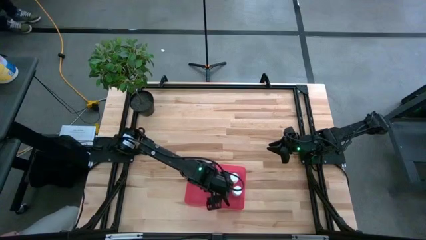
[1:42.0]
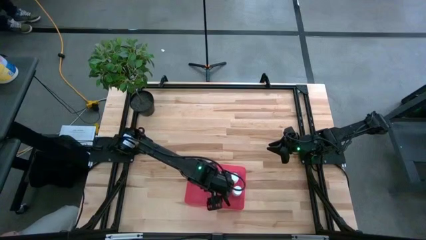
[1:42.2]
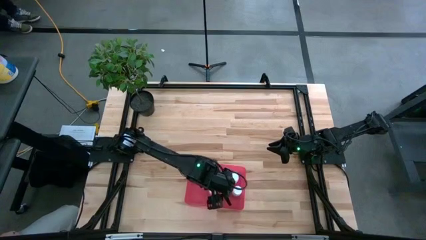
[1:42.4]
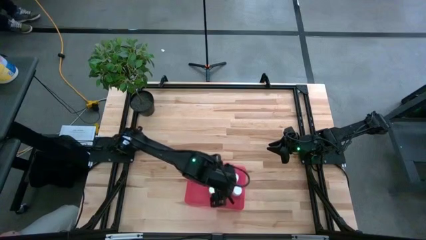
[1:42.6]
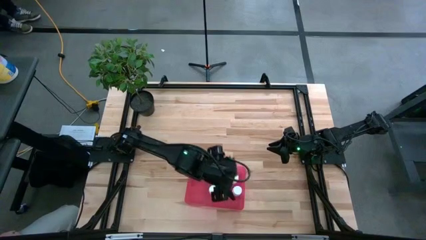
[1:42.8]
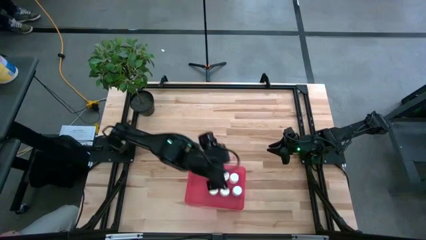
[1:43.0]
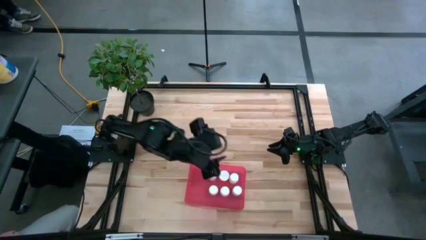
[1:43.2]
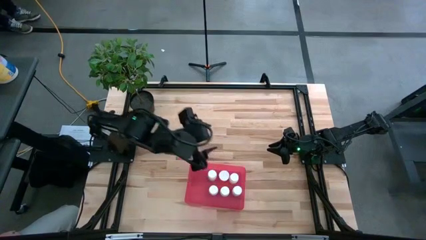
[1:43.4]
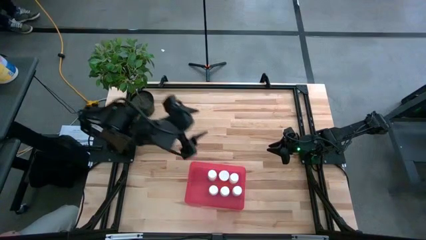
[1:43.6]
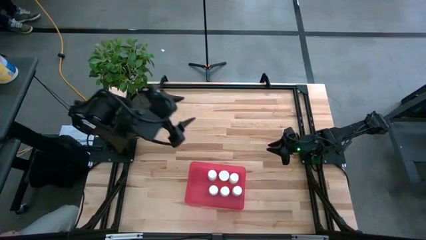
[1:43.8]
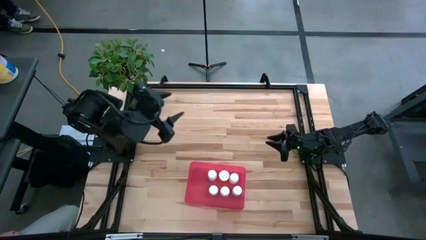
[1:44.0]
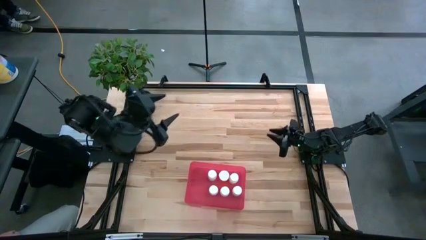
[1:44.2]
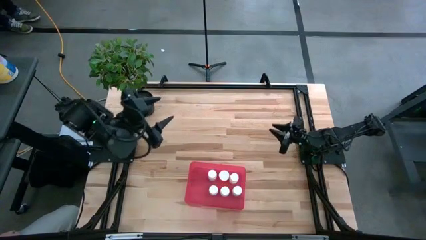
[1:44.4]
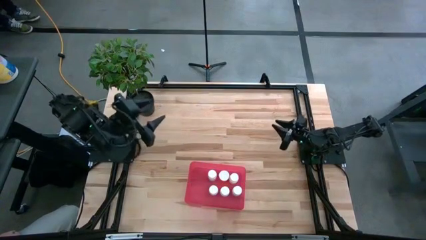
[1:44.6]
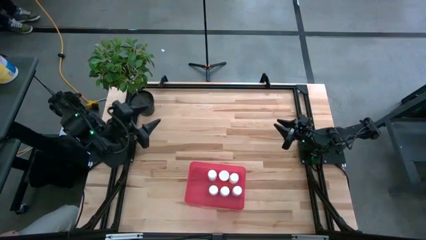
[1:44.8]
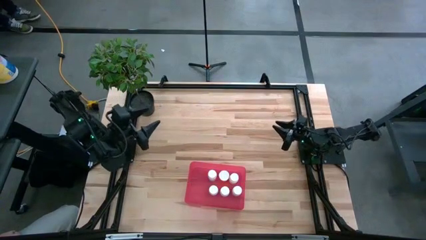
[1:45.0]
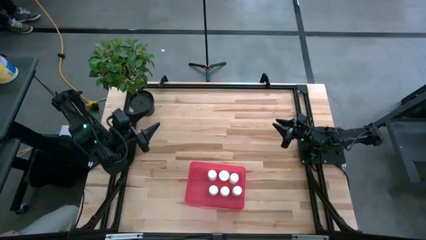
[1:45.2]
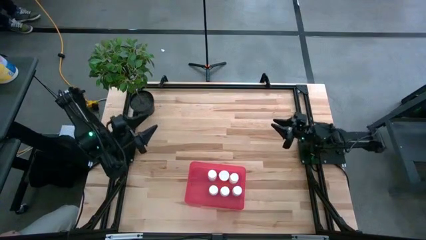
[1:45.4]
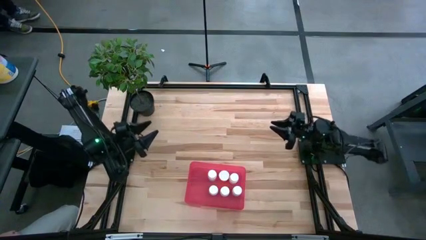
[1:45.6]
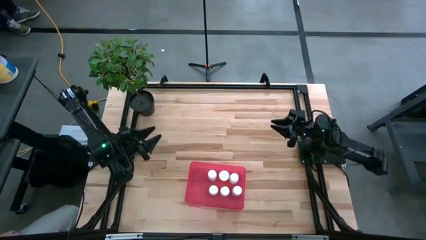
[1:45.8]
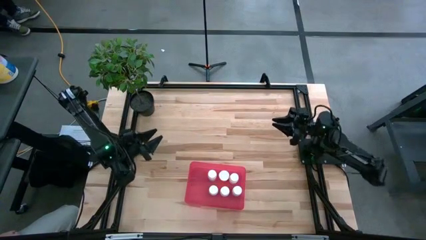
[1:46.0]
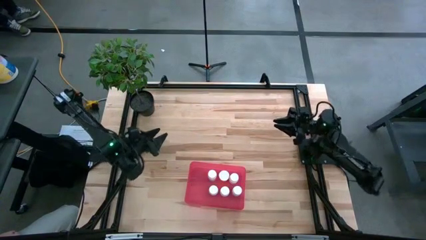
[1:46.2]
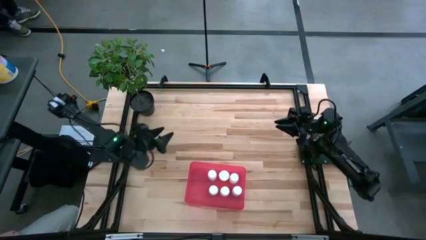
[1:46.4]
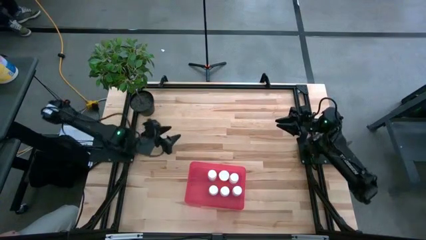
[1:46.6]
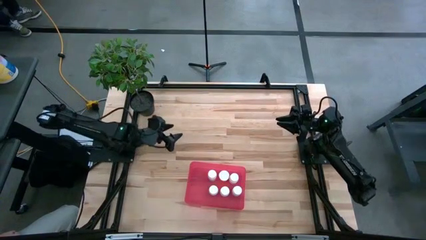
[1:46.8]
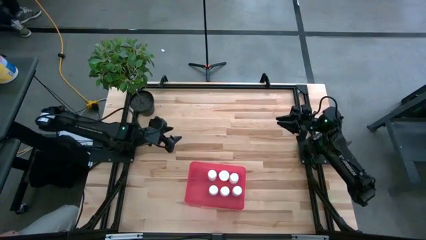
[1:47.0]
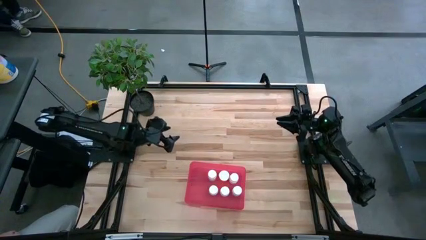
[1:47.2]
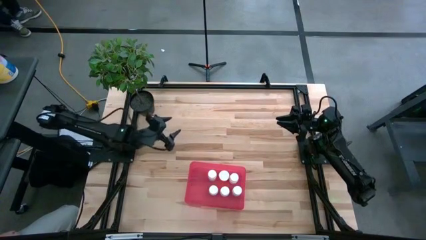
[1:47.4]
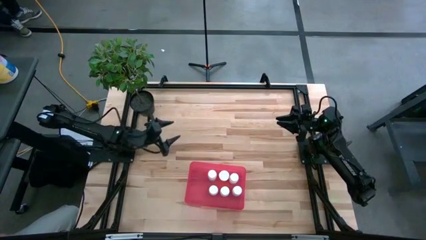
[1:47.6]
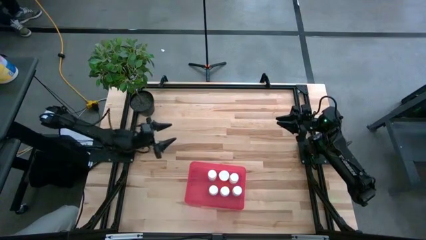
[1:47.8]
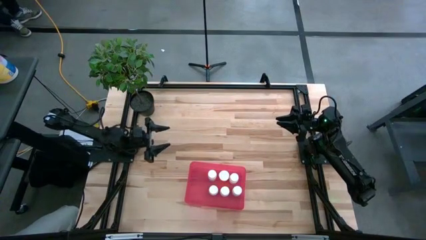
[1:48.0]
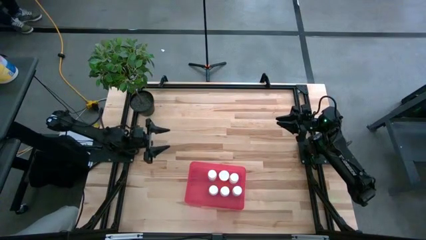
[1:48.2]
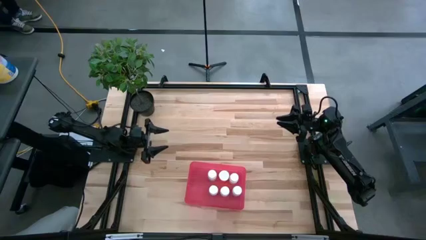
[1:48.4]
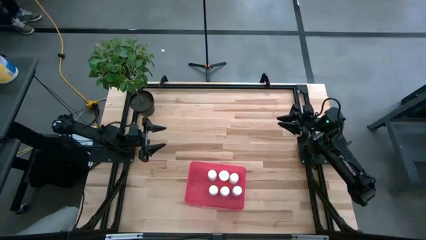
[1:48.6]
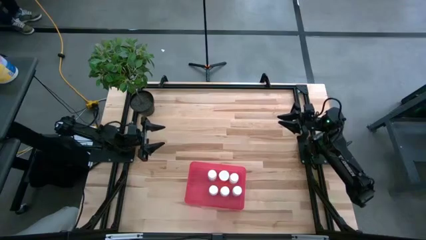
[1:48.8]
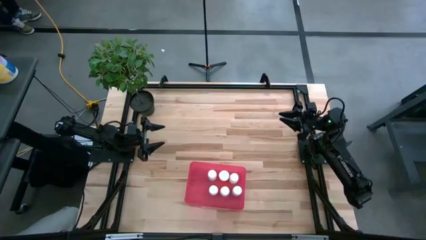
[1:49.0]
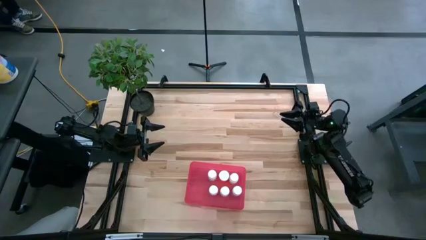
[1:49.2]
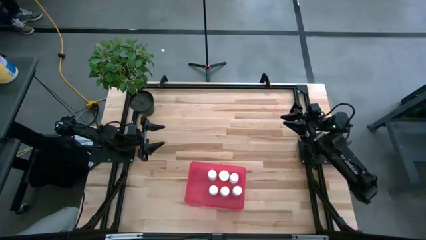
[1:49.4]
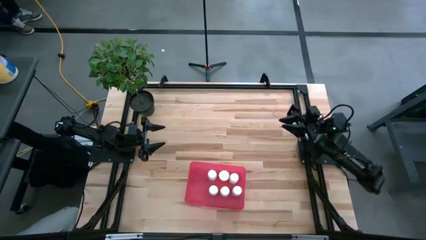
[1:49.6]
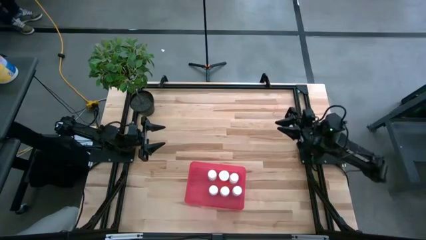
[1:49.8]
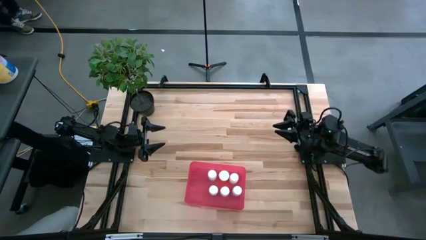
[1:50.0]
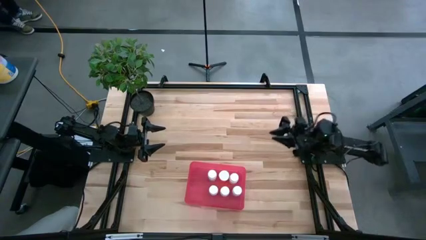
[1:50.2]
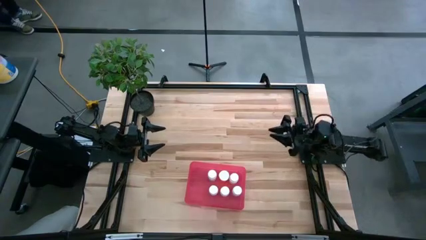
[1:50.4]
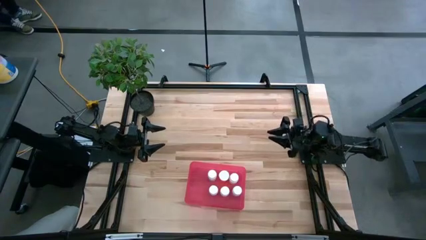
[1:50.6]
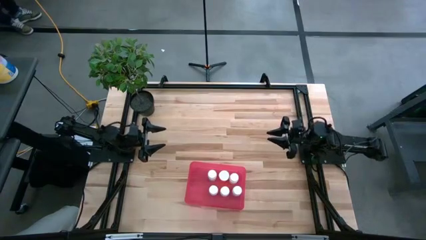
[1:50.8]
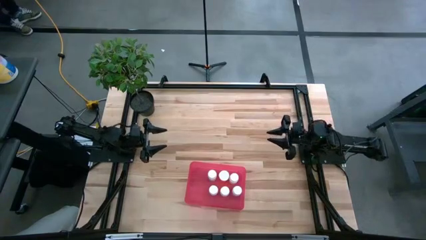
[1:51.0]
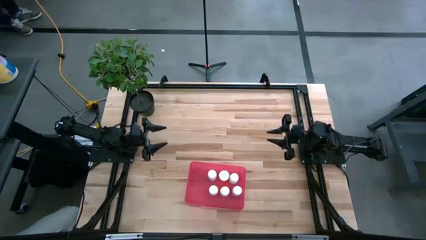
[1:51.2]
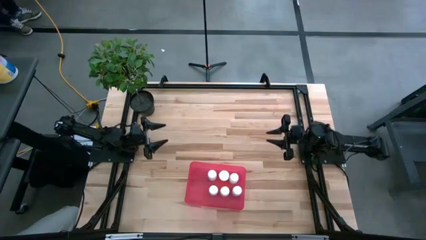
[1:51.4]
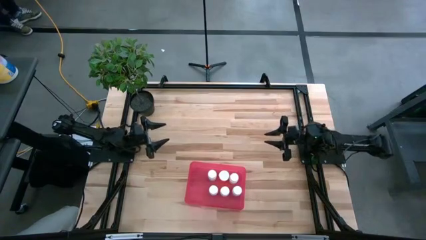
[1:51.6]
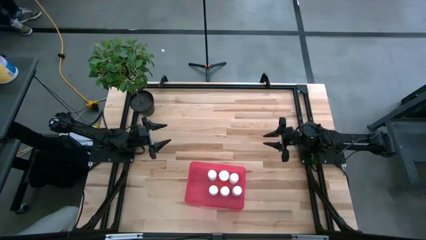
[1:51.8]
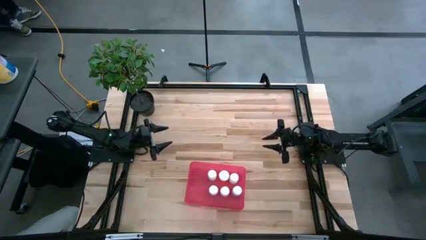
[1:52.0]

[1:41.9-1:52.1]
Task: Pick and place pill bottles into a basket
Return to Home Position
